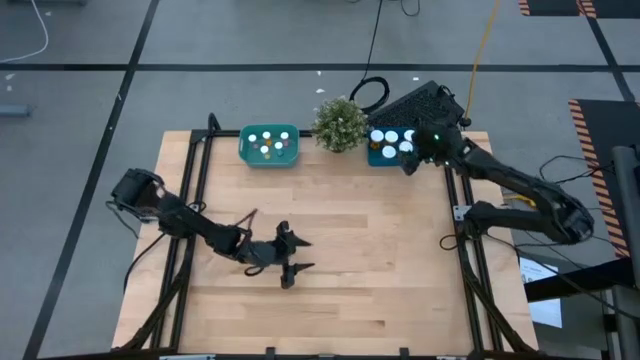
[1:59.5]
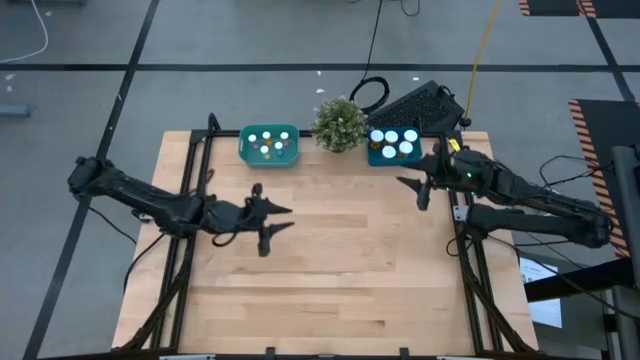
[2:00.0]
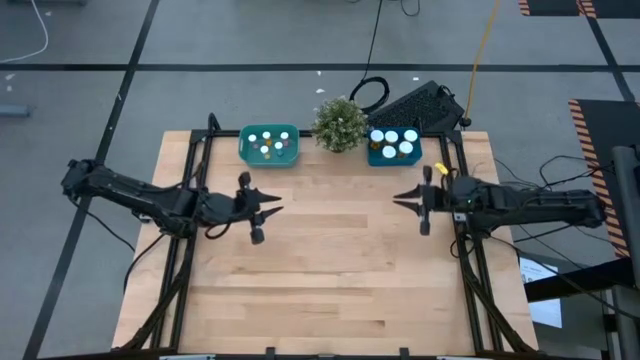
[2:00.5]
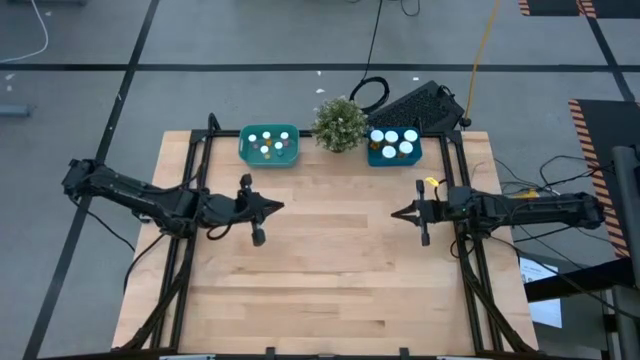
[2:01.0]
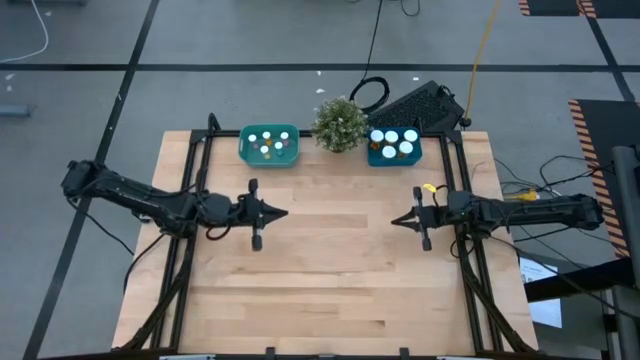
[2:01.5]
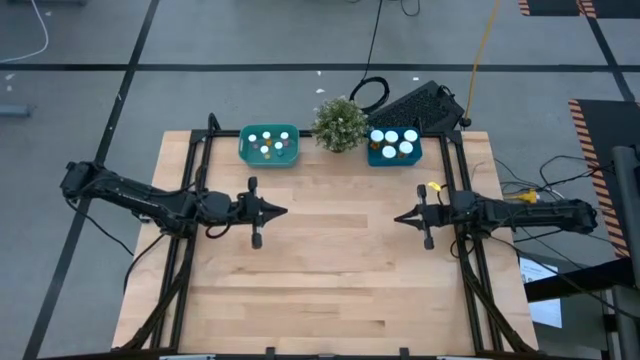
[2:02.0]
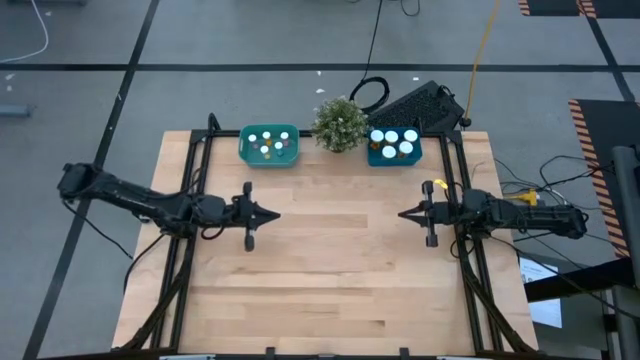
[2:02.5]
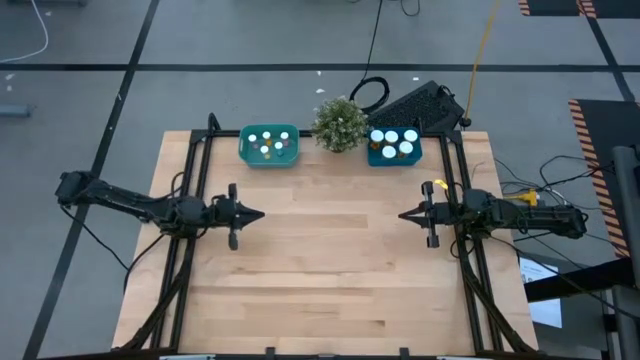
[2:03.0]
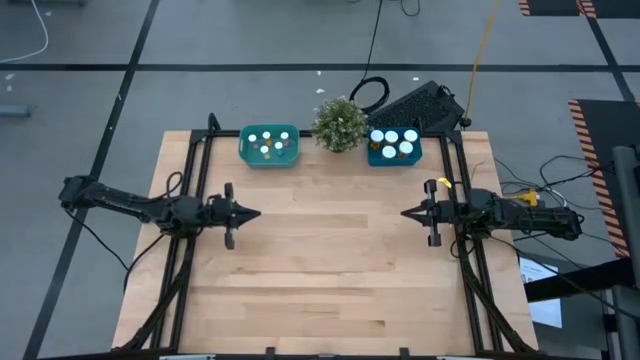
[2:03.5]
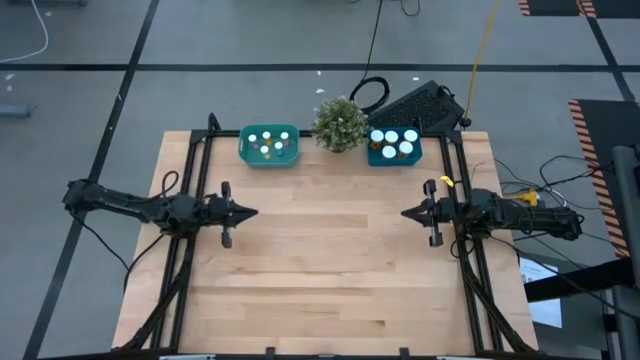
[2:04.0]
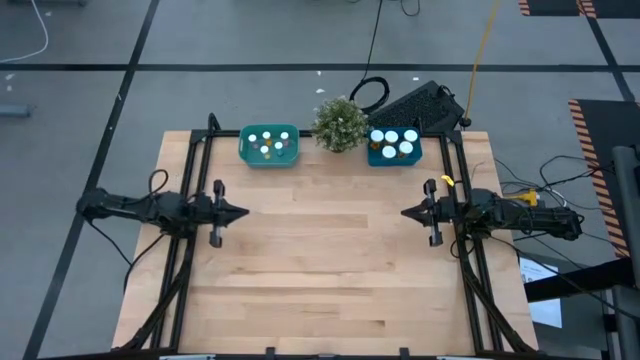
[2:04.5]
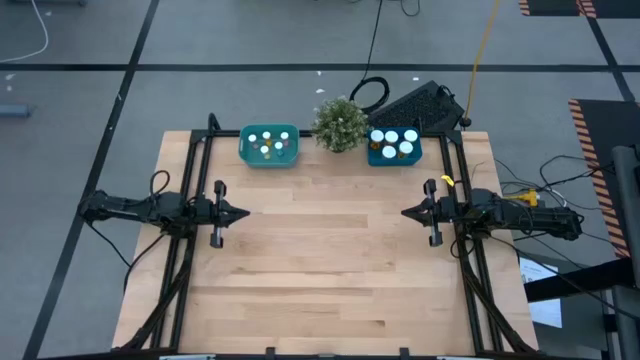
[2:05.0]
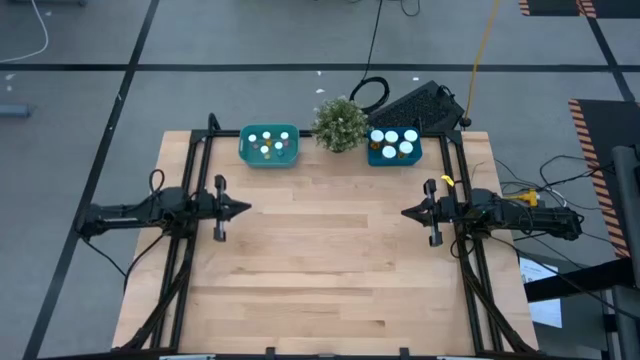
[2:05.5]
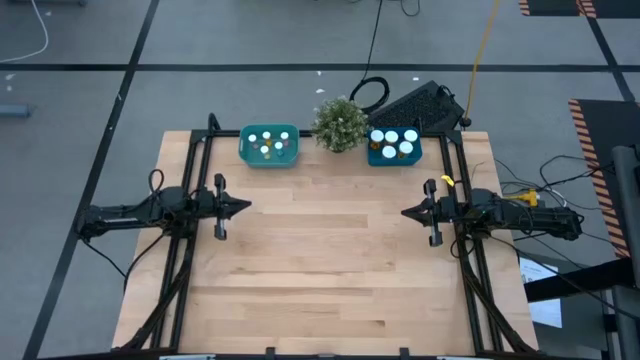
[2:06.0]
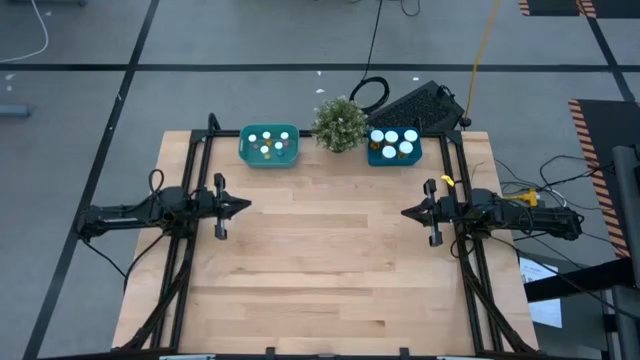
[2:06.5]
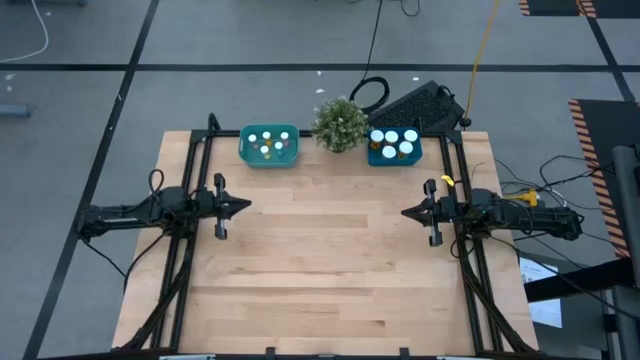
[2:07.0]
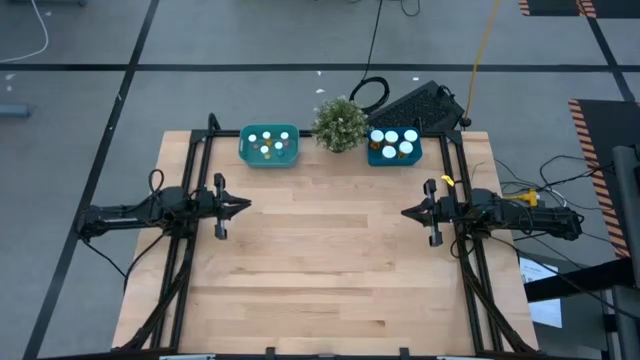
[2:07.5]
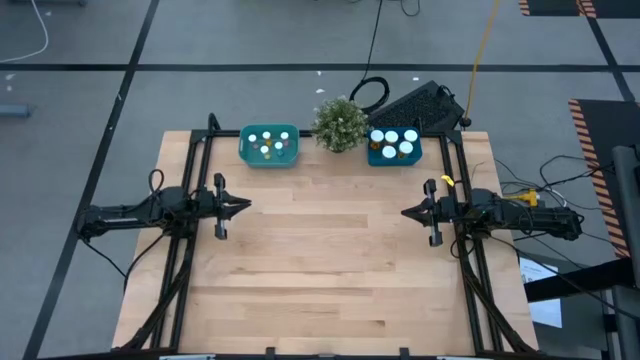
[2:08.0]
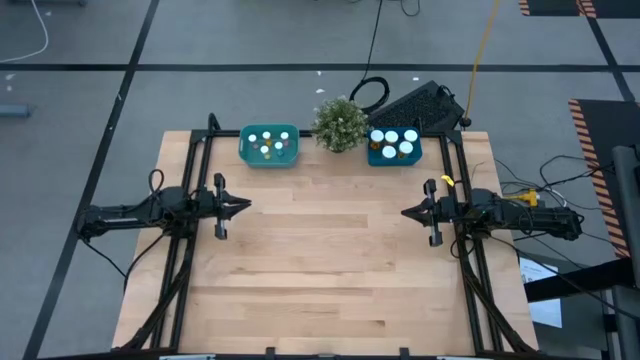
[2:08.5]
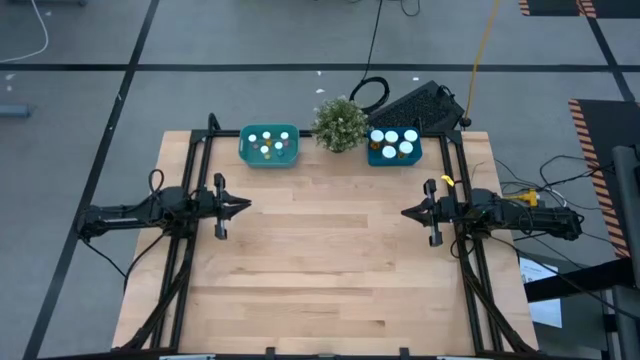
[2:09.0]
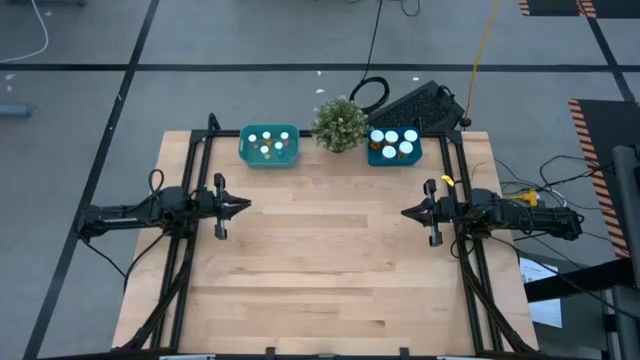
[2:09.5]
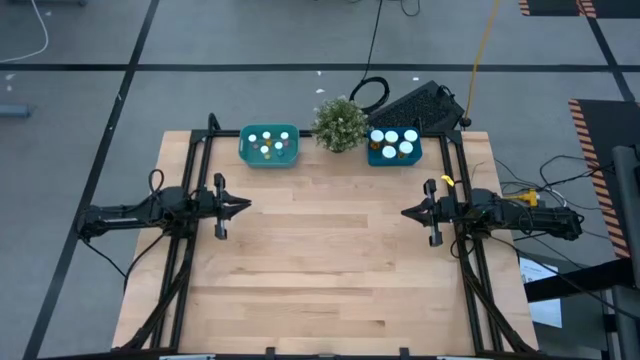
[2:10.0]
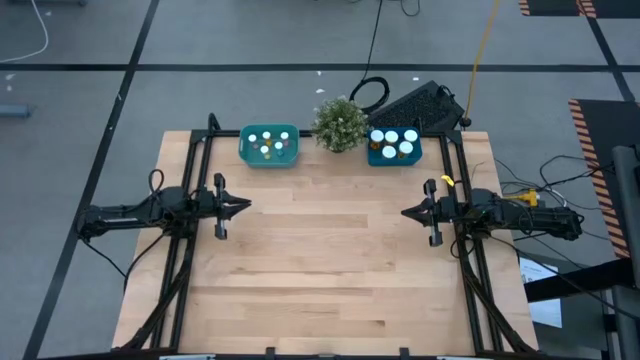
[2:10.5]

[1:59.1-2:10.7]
Task: Pick and place medicine bottles into bin by pill shape (circle, oval)
Return to Home Position

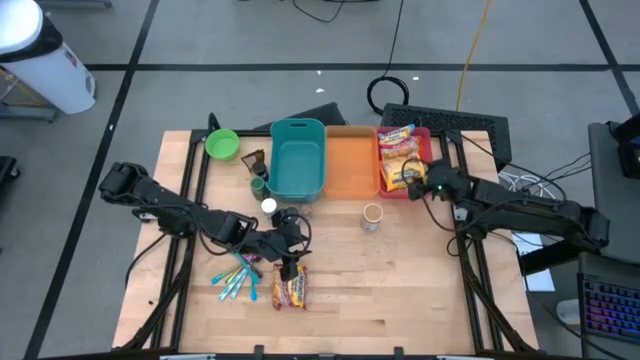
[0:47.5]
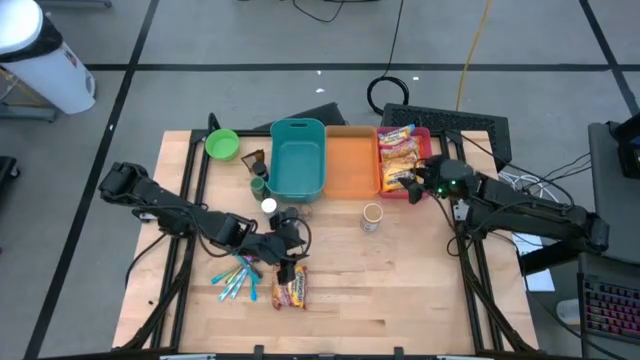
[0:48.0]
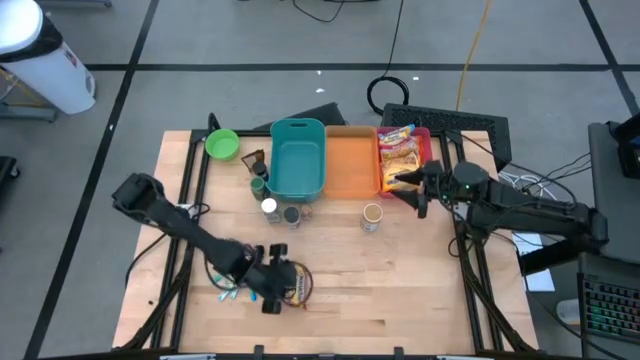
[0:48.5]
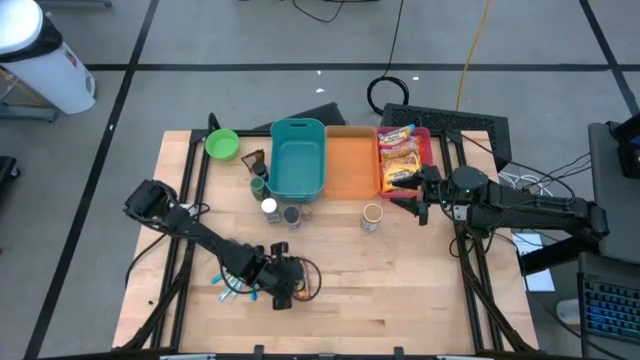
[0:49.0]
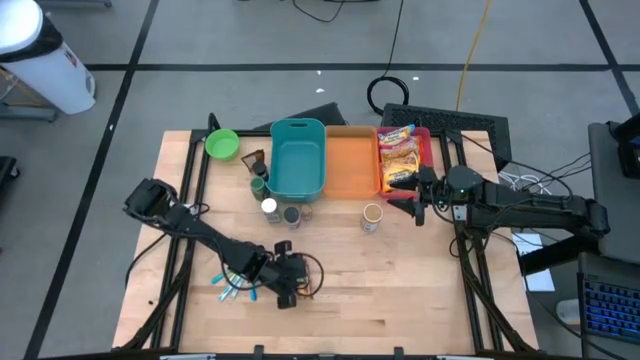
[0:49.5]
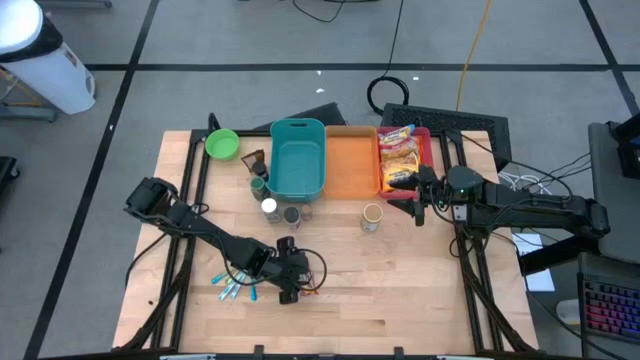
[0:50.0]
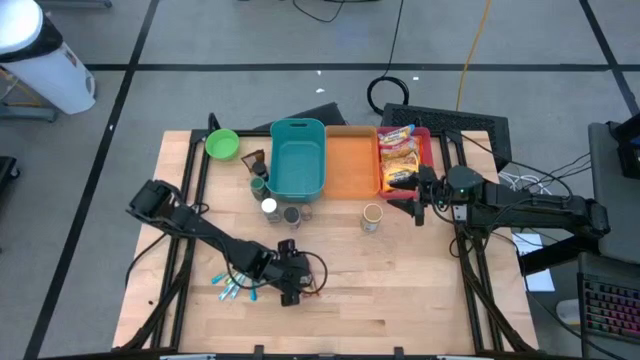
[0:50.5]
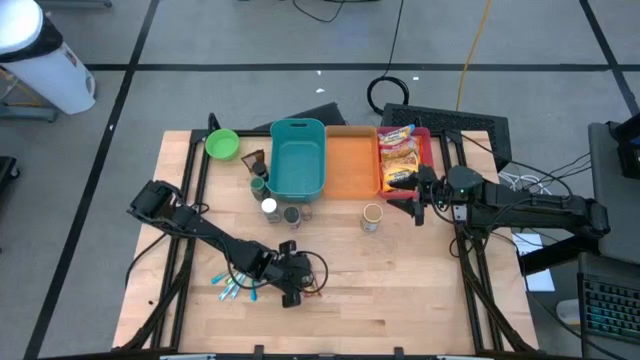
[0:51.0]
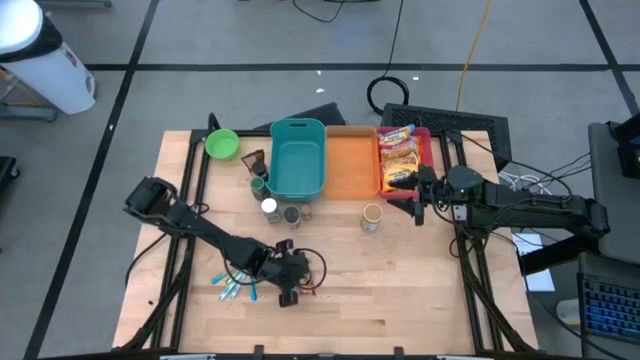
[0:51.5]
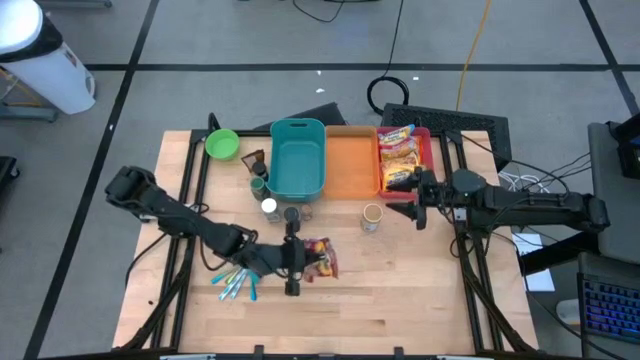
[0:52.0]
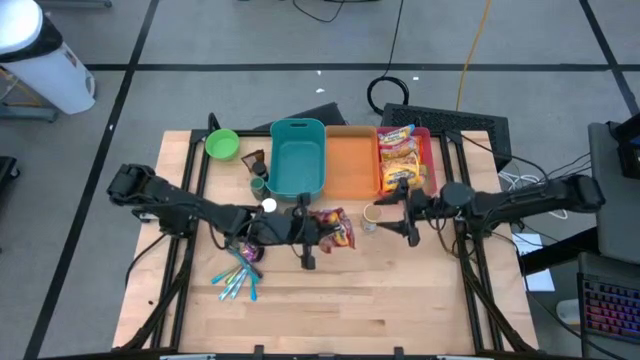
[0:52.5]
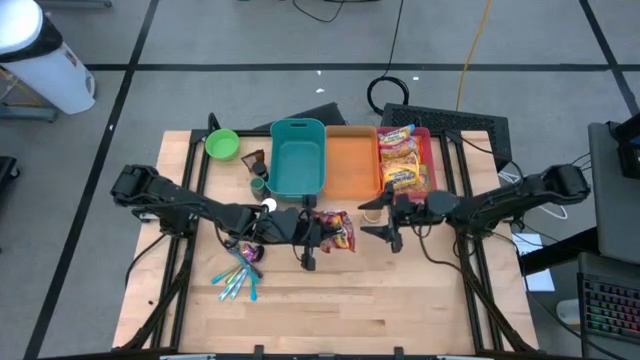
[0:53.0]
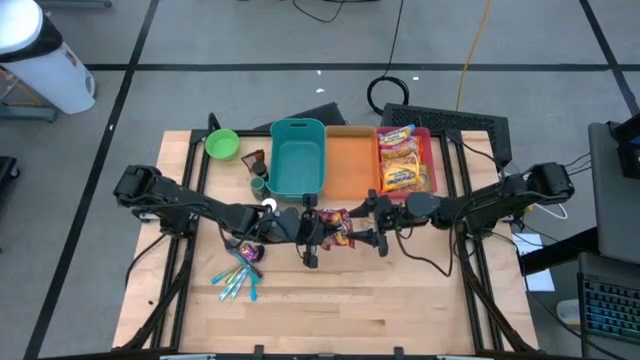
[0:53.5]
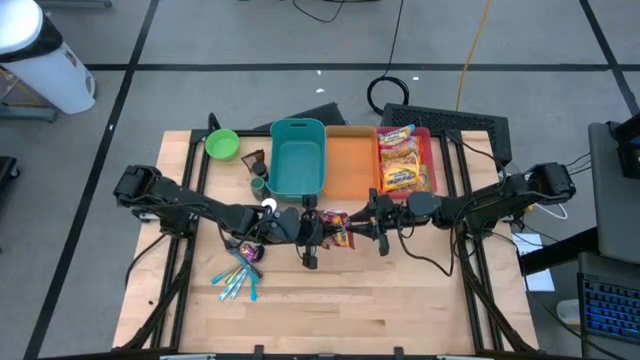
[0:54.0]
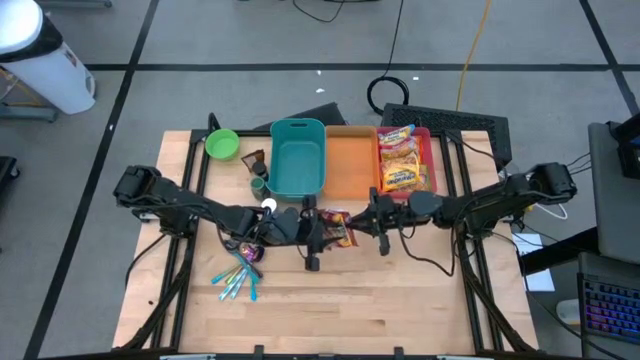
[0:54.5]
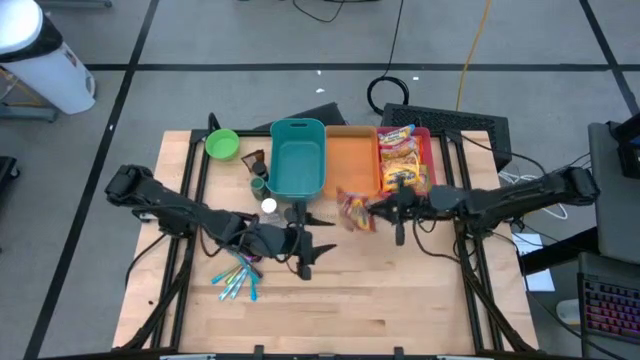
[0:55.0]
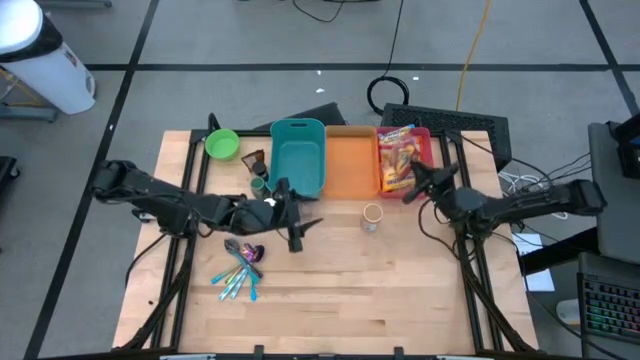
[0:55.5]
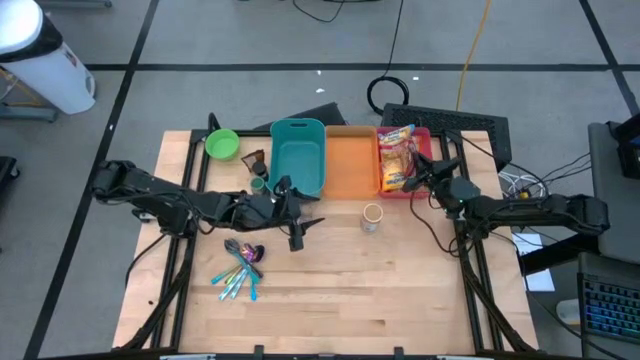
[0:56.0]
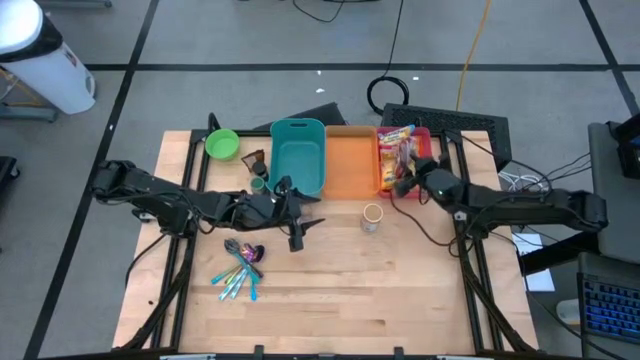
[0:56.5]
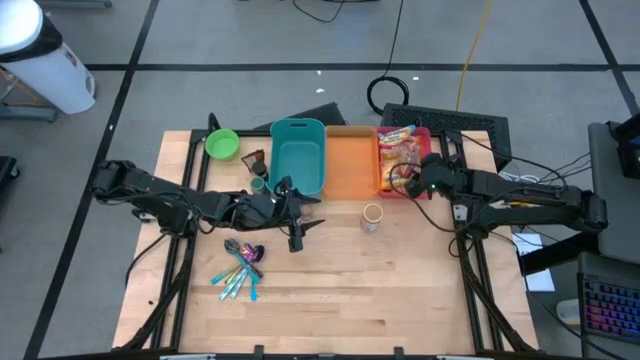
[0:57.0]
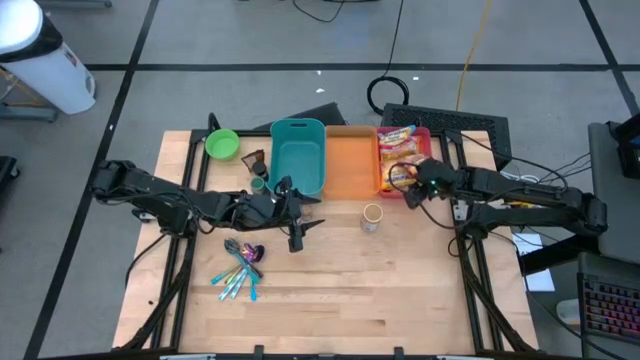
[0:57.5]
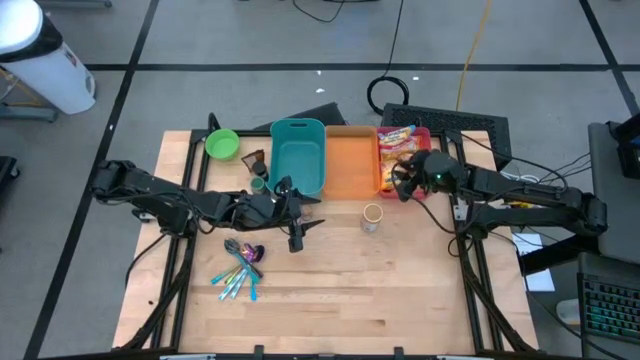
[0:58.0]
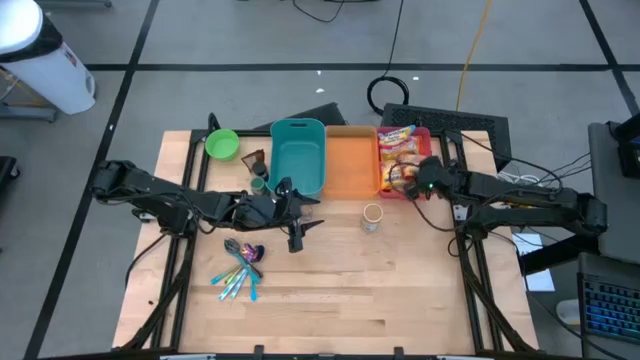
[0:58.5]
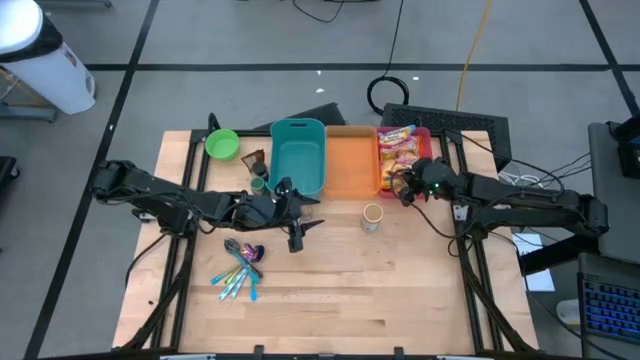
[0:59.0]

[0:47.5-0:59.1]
Task: Pick & Place Food Item
Put the red noodle pack into the red bin
